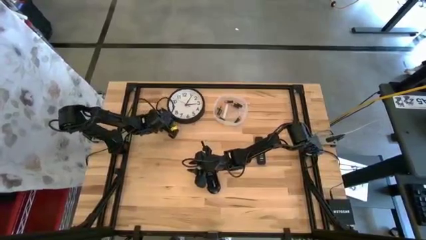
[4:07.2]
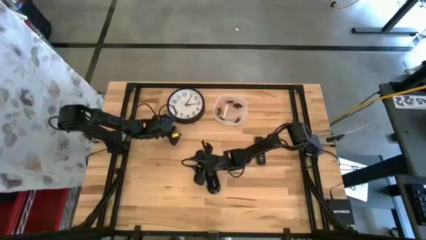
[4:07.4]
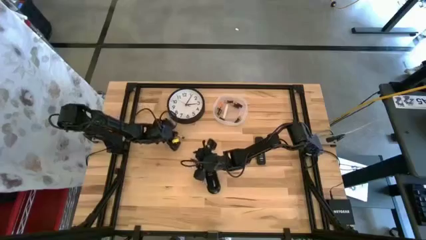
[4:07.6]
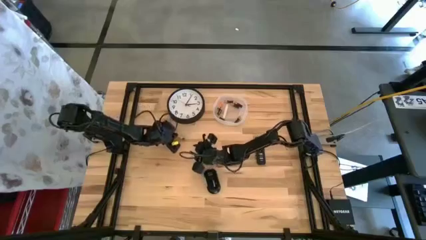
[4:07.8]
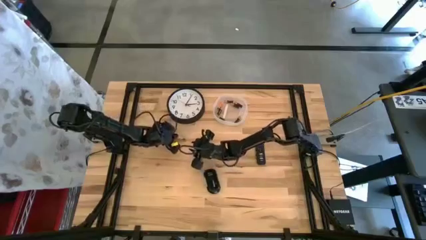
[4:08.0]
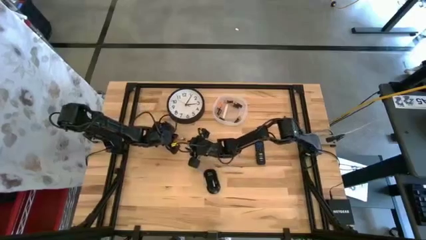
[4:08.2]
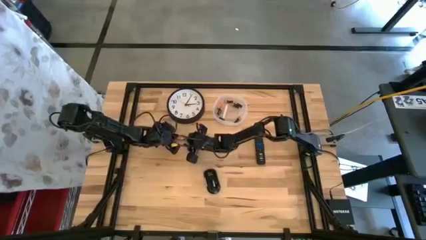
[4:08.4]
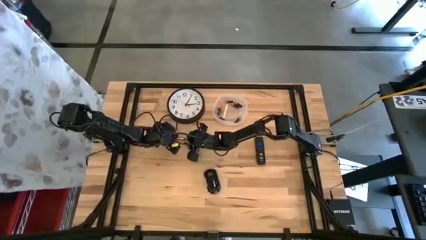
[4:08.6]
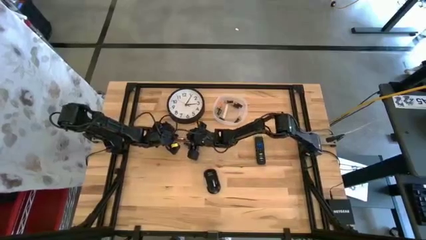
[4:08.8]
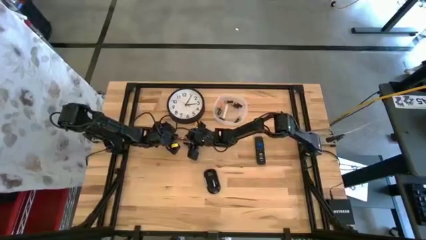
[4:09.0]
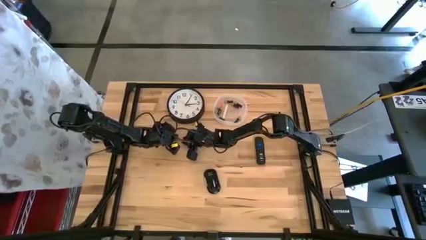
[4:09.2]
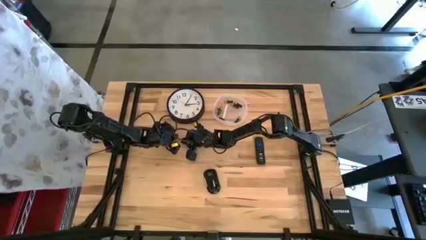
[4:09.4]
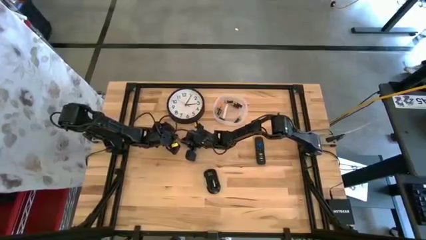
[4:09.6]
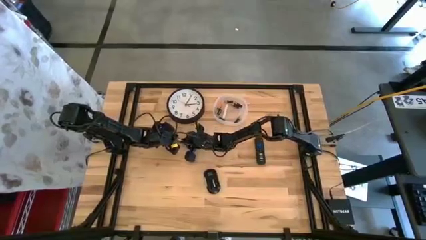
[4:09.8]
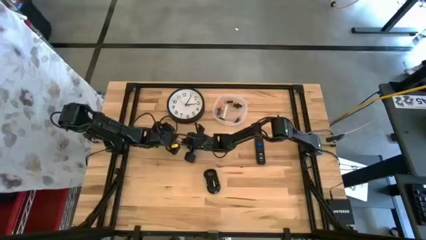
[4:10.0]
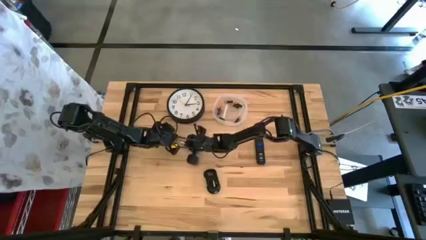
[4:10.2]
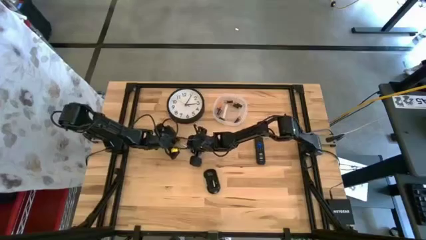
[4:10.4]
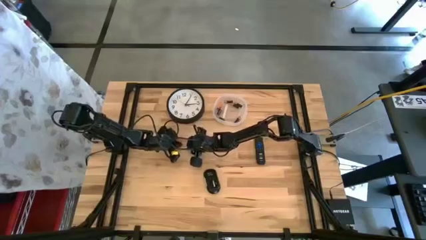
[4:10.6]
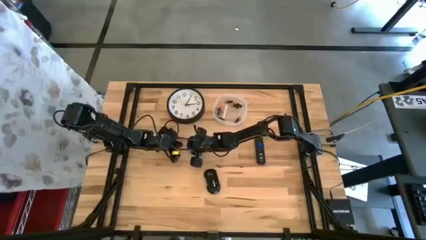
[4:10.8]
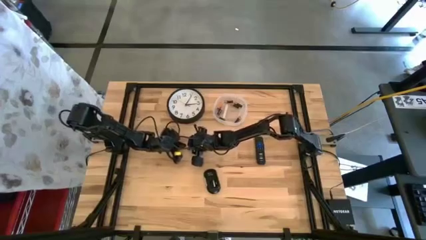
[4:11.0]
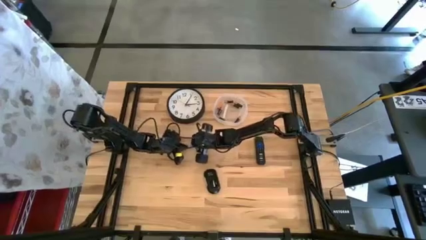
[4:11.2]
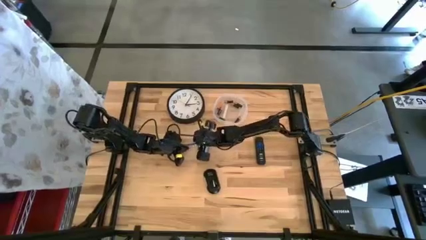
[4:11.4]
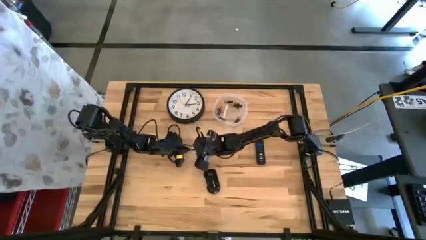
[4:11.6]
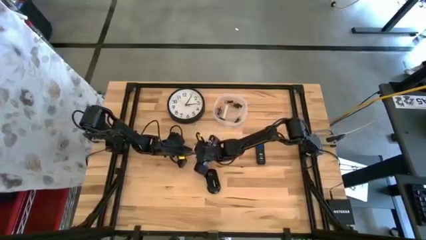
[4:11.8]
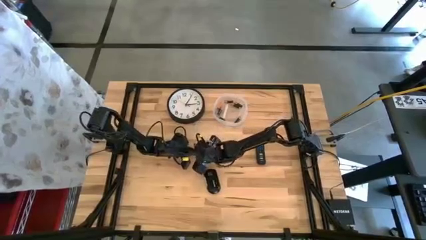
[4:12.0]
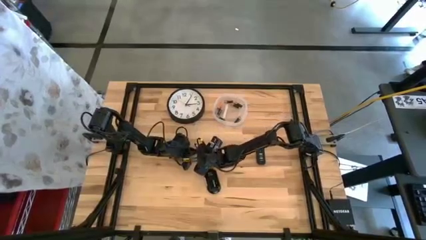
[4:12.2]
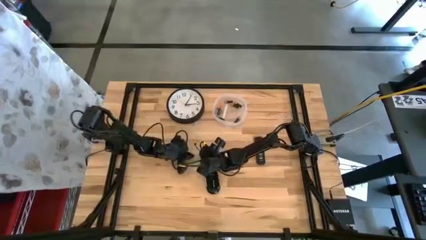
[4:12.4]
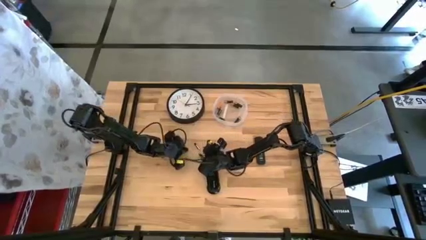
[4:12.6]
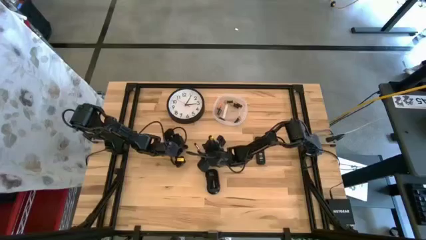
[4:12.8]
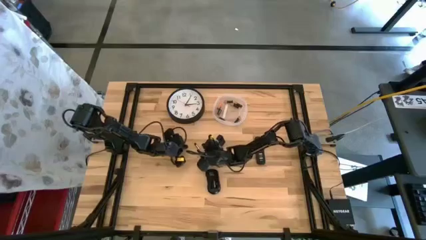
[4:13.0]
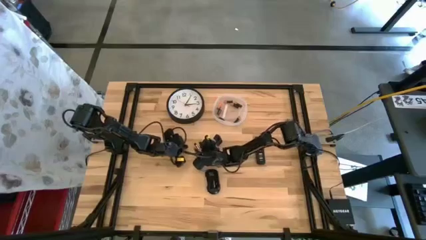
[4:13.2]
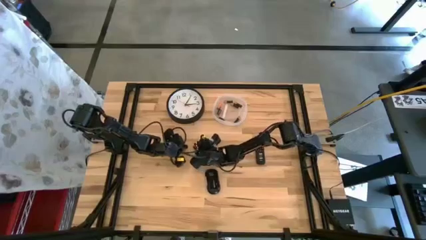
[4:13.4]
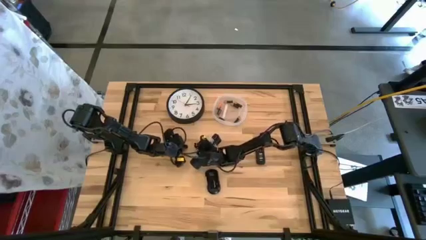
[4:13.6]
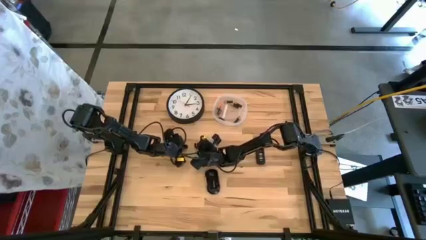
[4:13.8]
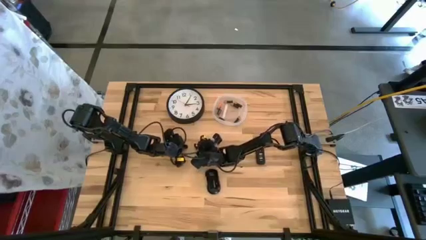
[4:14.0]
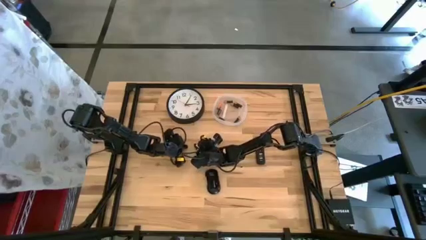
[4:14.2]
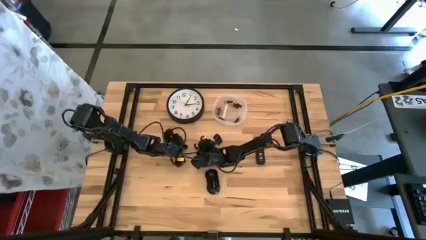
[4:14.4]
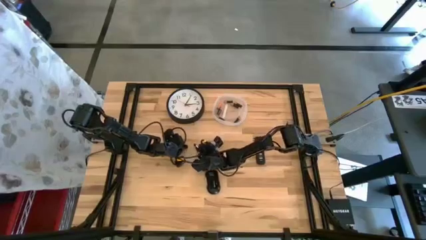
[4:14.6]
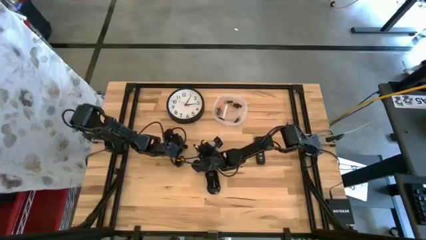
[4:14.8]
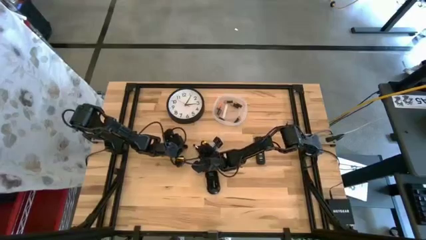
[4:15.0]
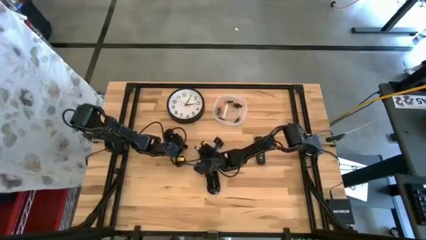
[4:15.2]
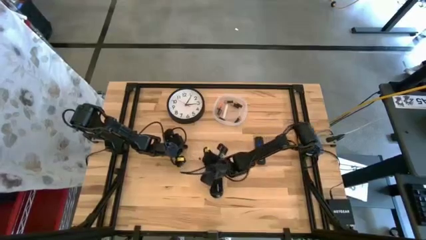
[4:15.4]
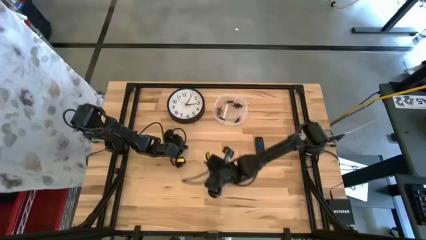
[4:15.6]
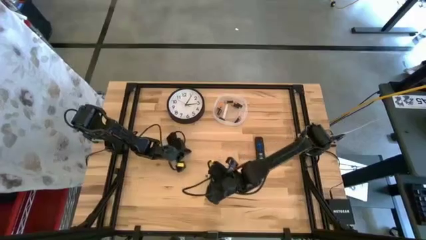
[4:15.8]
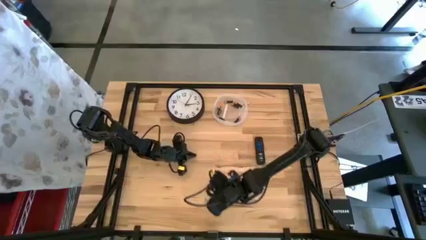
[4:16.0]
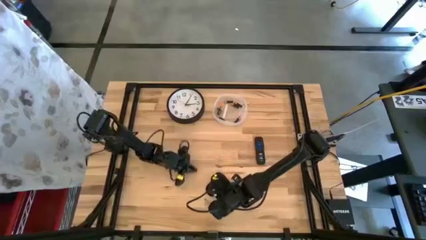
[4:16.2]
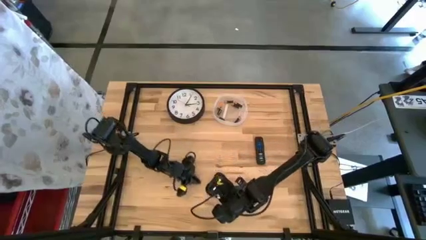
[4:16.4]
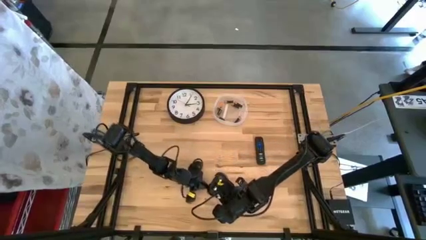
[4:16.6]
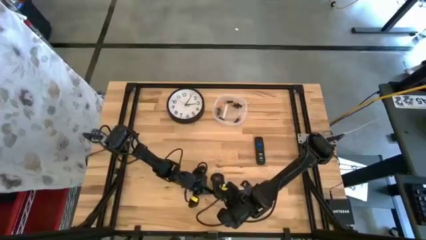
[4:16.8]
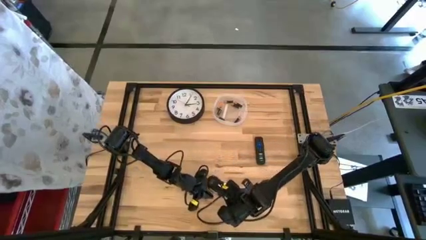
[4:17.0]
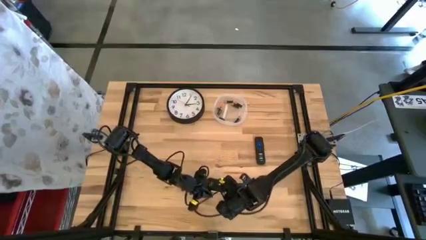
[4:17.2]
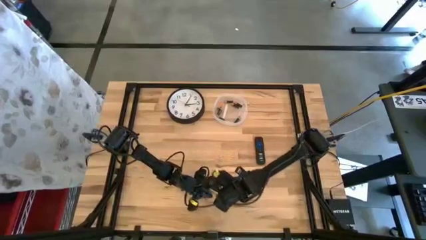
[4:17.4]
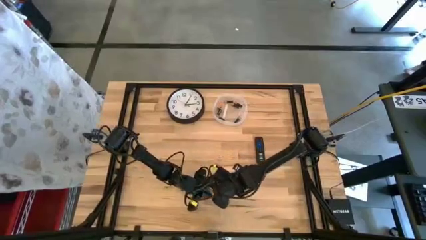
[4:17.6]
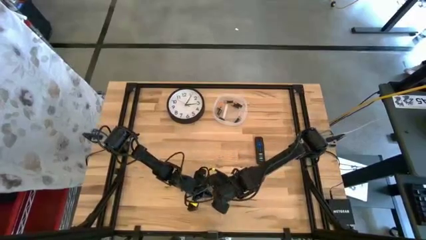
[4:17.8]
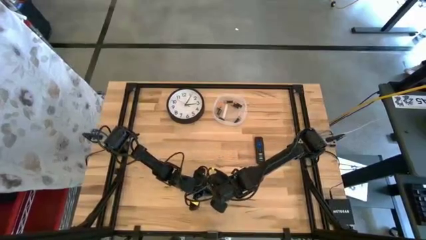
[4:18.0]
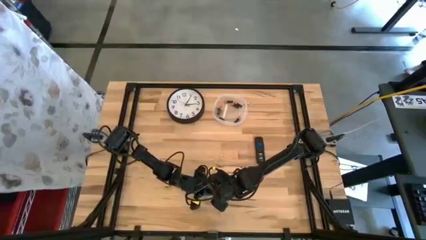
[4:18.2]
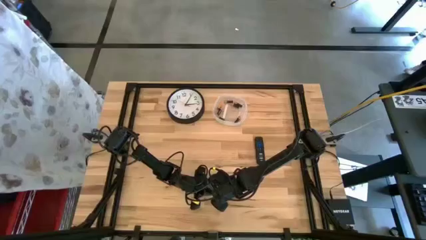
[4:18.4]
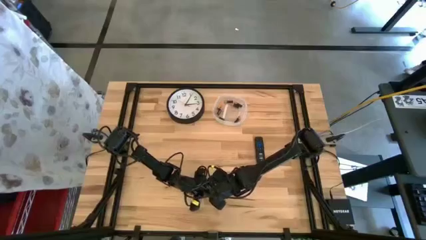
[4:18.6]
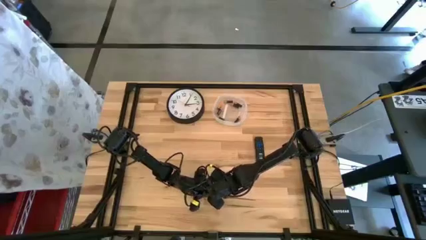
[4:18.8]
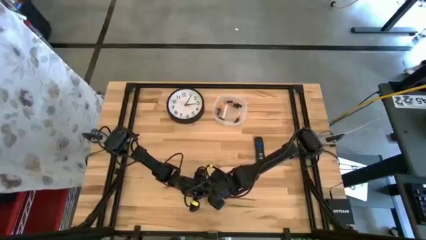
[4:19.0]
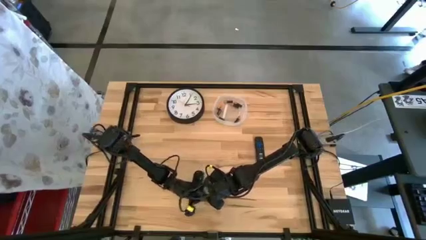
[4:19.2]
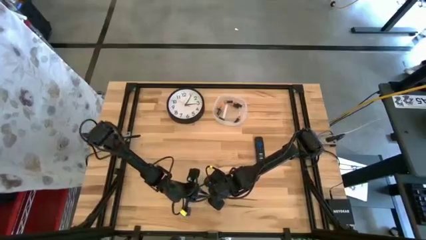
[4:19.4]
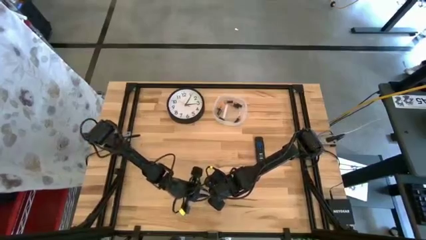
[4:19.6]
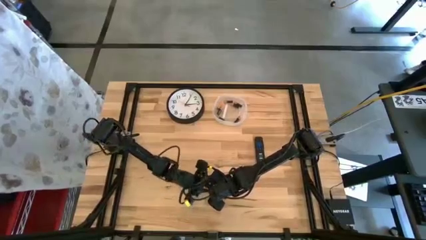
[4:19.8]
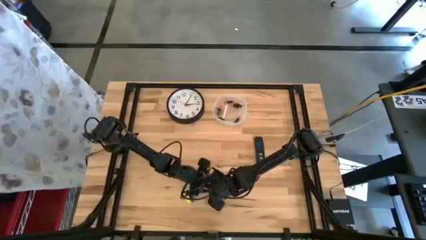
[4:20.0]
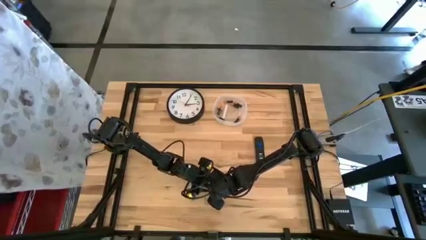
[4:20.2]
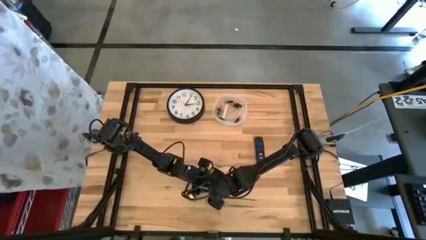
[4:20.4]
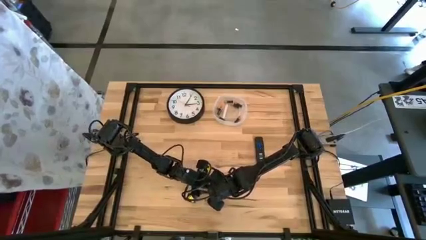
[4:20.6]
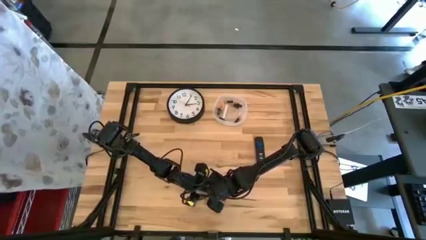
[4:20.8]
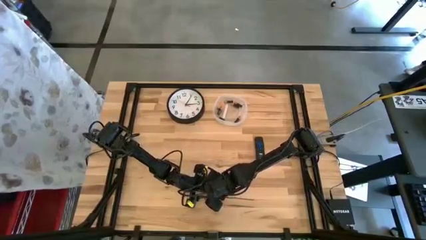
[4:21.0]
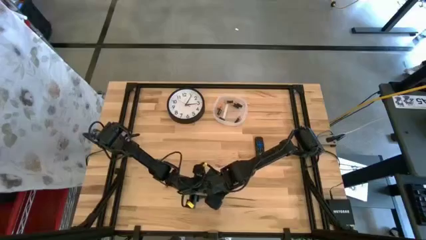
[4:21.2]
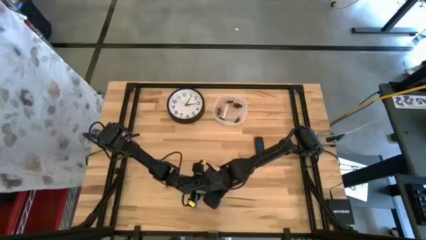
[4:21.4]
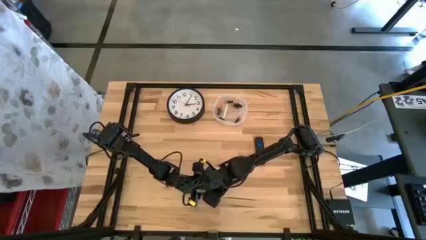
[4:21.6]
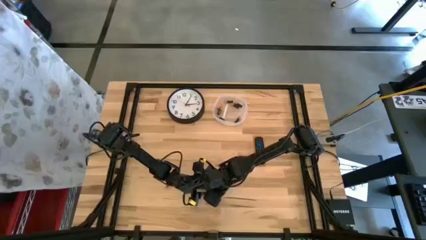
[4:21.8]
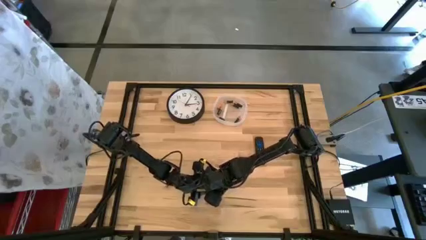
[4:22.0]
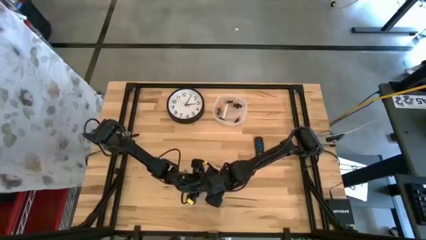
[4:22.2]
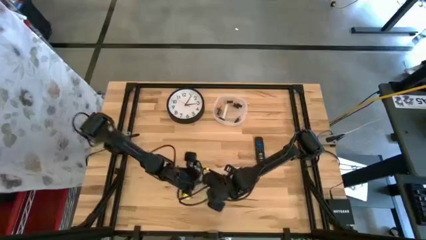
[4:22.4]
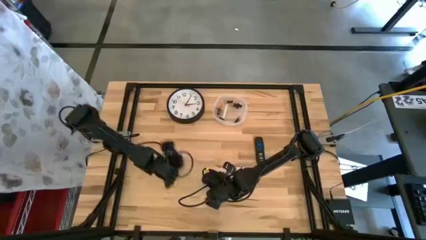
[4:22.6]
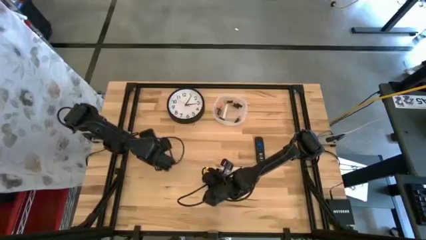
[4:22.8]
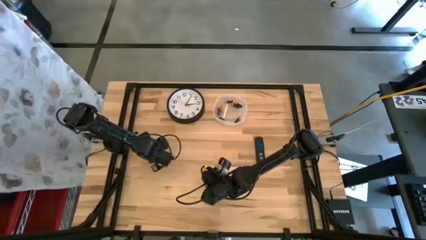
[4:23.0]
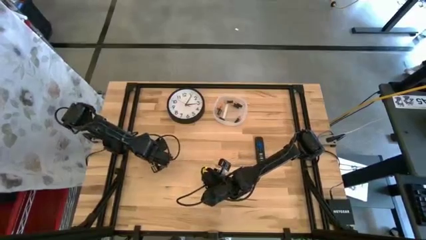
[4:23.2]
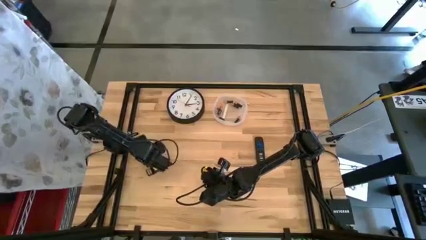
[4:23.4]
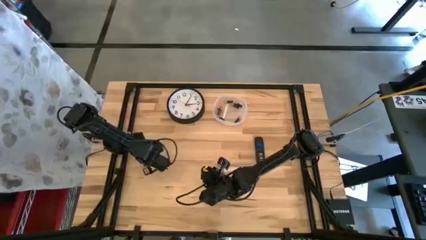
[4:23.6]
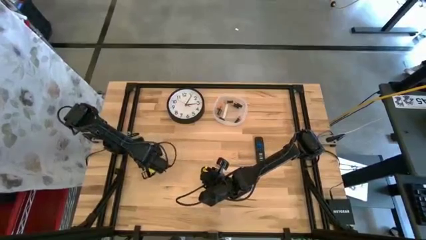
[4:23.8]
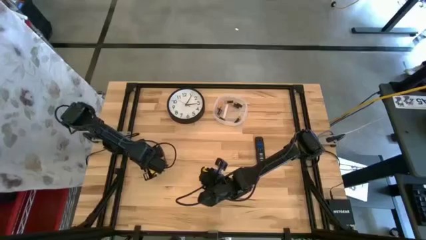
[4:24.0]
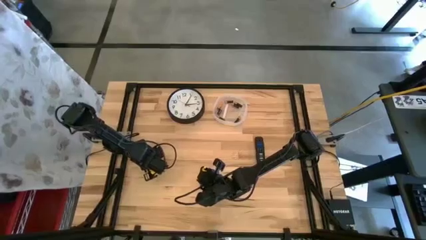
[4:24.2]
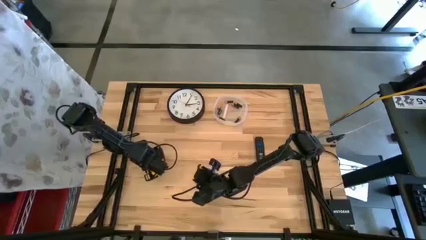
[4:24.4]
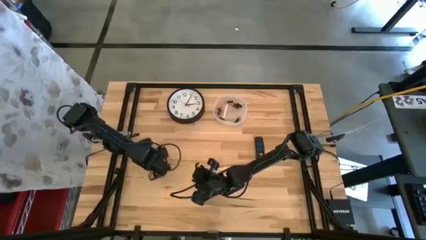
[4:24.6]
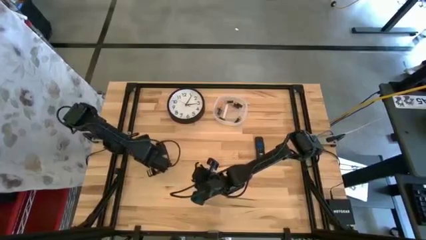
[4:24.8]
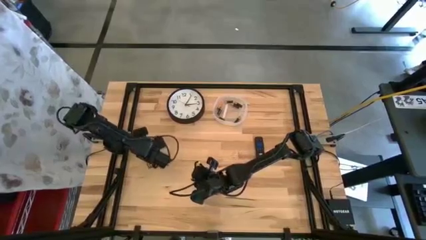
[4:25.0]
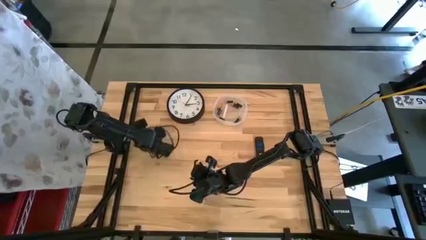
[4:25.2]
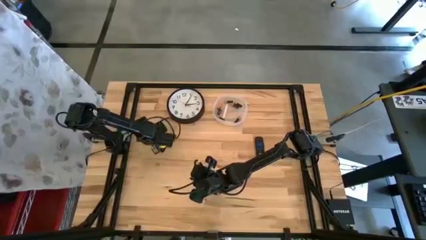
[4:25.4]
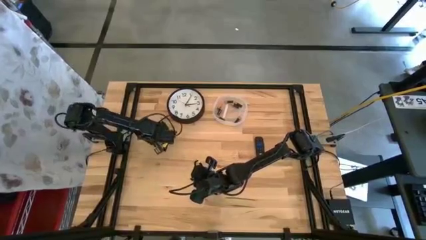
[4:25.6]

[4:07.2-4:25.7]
Task: Insert battery
Insert the silver battery into the computer mouse
